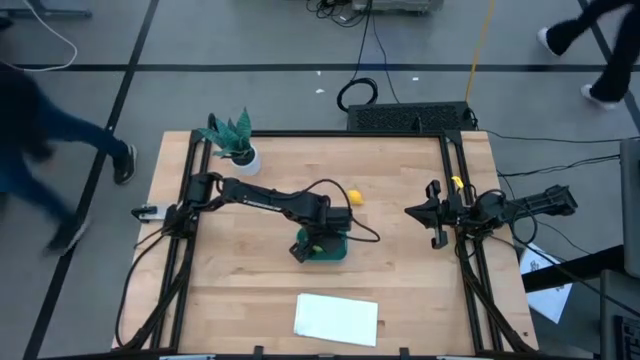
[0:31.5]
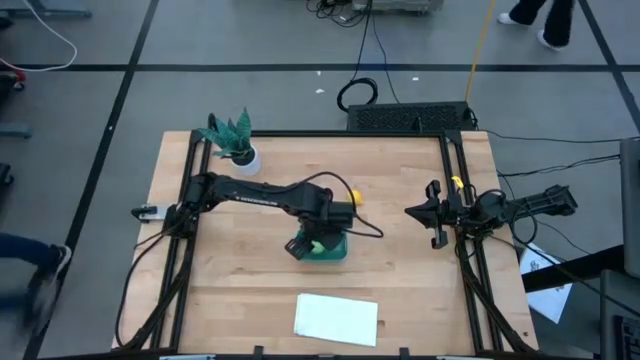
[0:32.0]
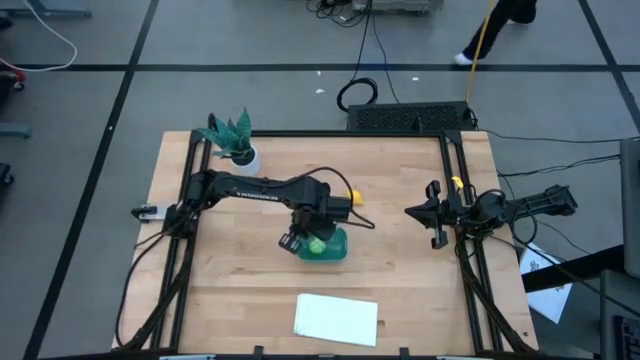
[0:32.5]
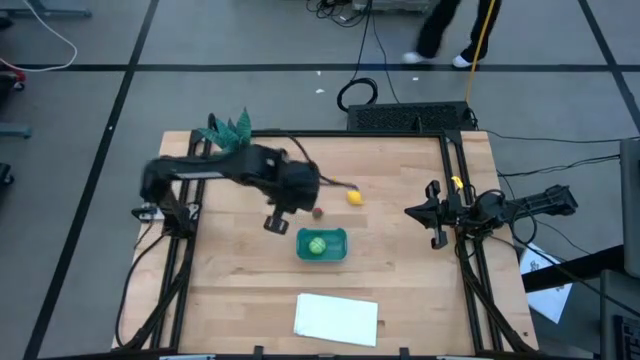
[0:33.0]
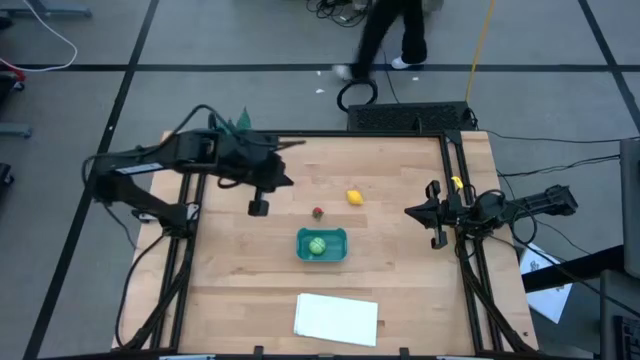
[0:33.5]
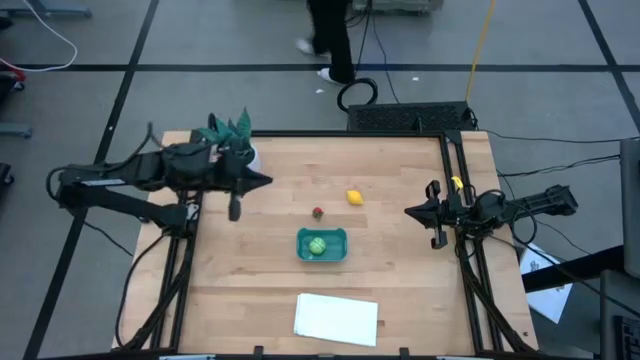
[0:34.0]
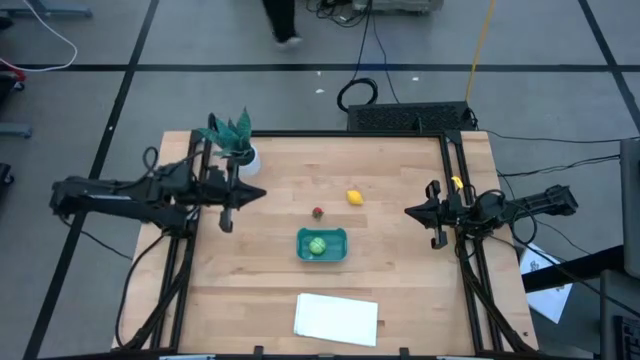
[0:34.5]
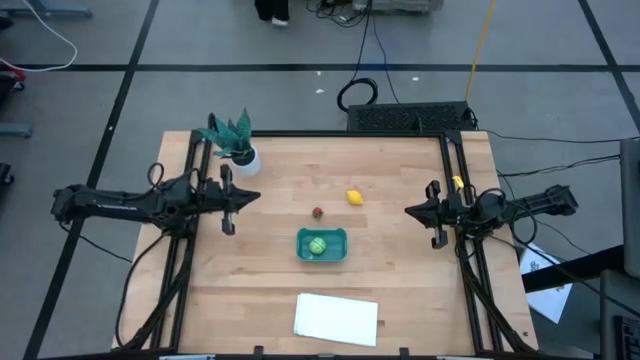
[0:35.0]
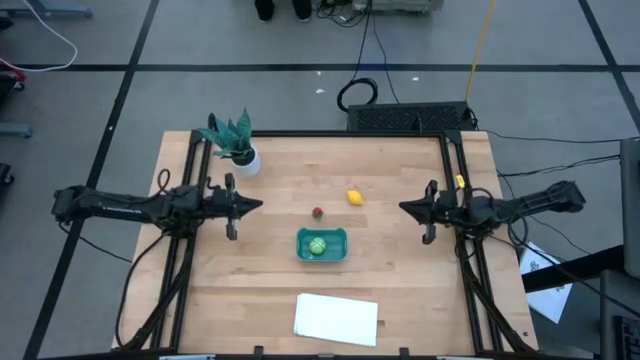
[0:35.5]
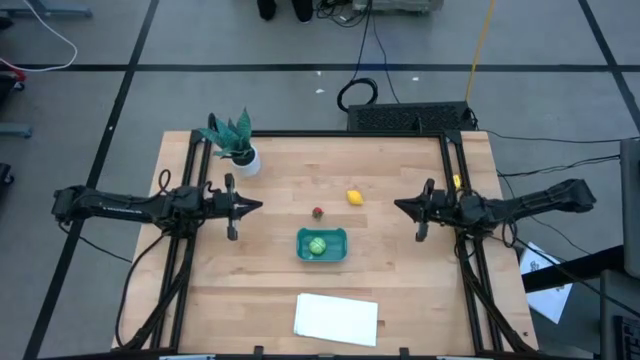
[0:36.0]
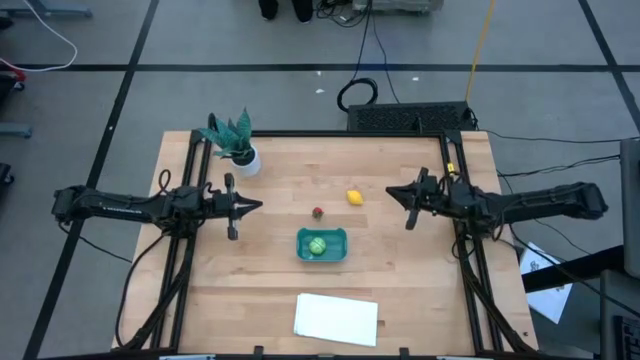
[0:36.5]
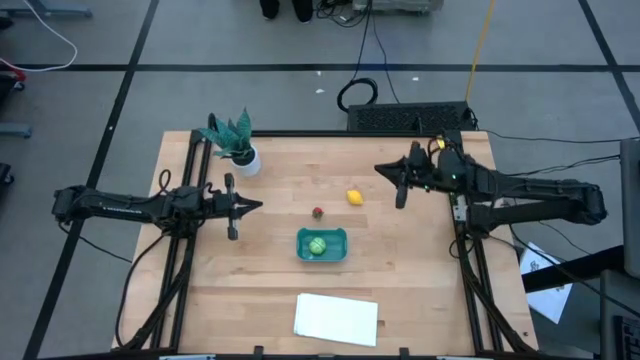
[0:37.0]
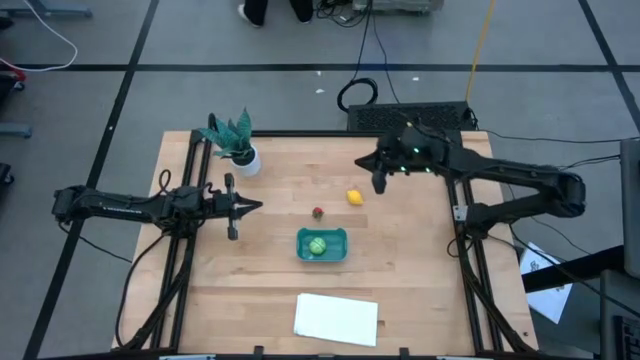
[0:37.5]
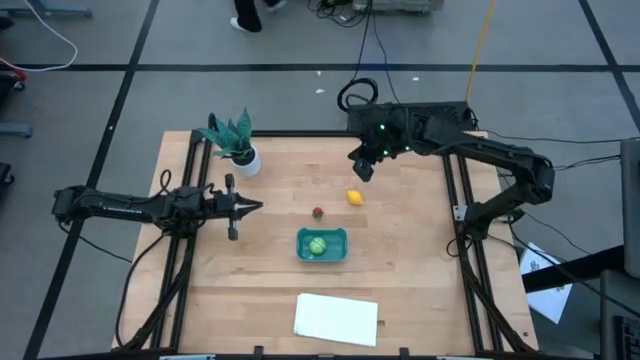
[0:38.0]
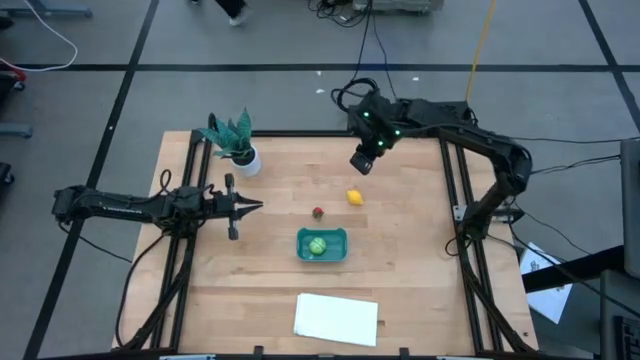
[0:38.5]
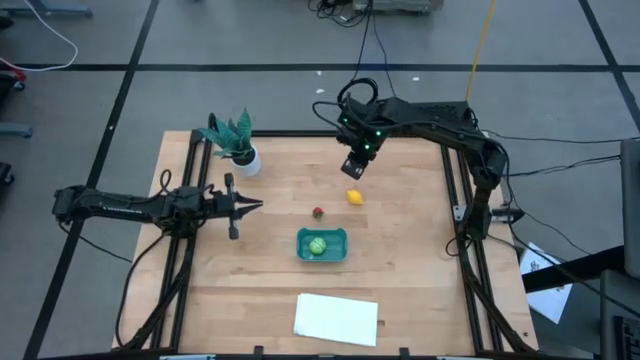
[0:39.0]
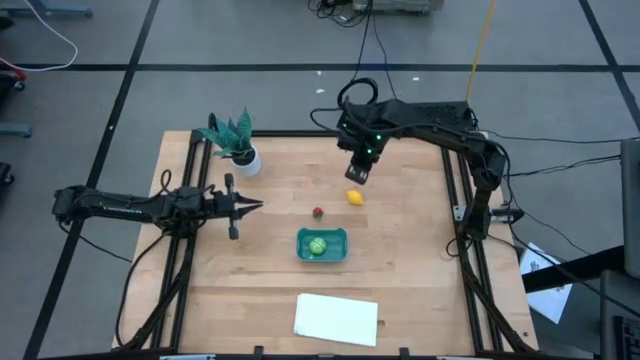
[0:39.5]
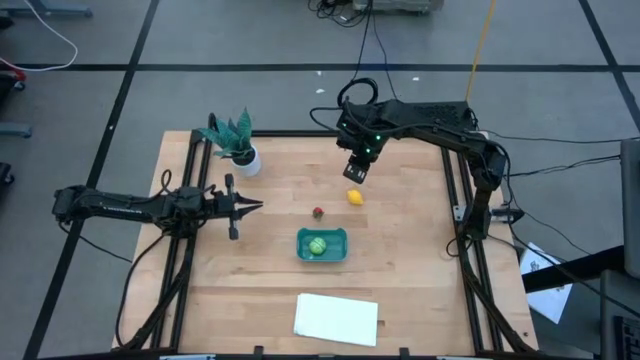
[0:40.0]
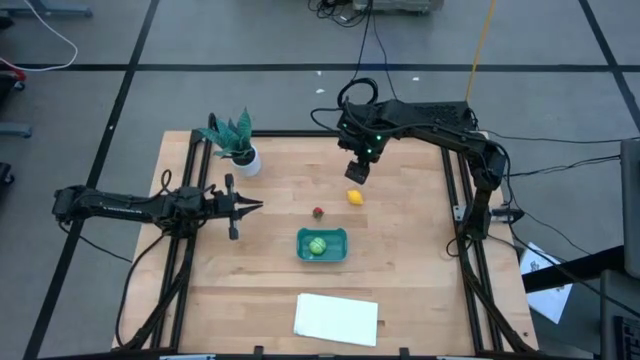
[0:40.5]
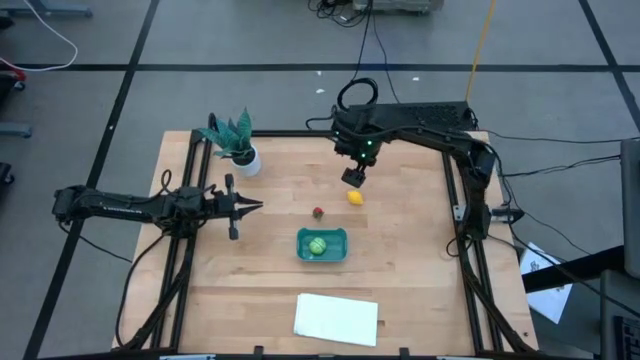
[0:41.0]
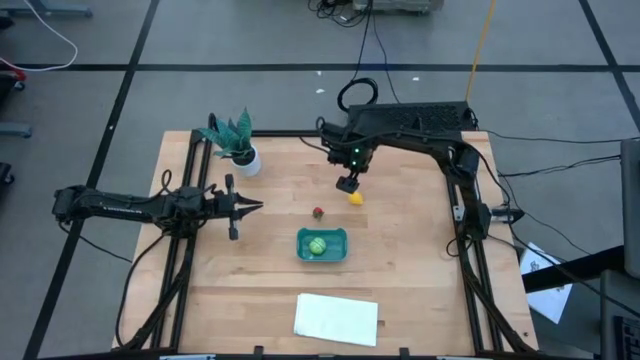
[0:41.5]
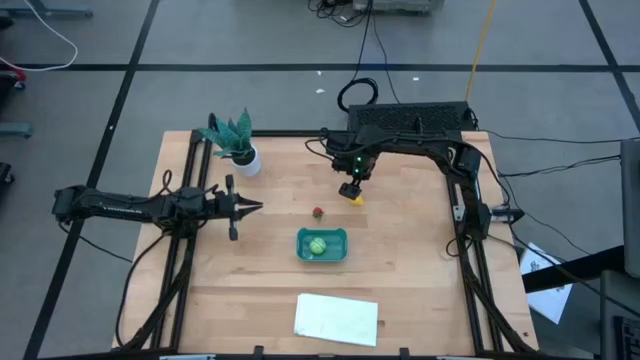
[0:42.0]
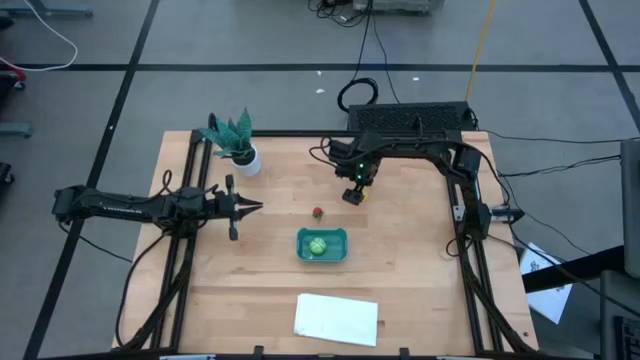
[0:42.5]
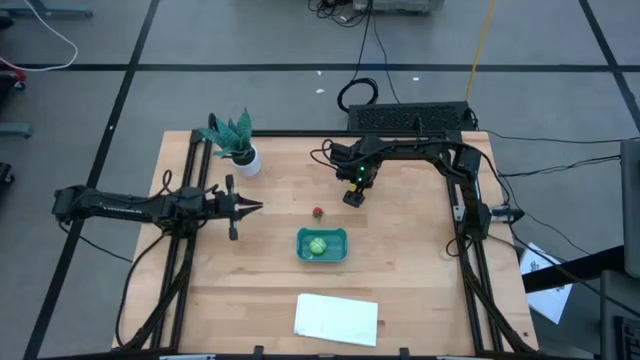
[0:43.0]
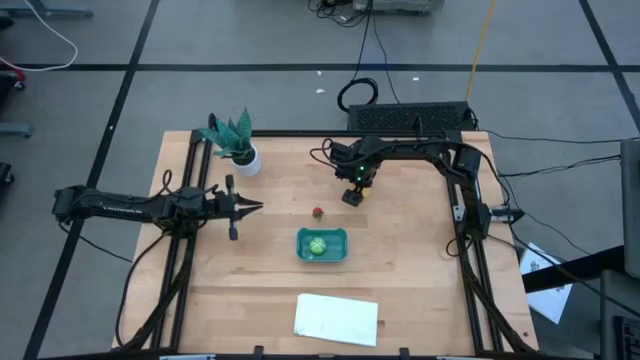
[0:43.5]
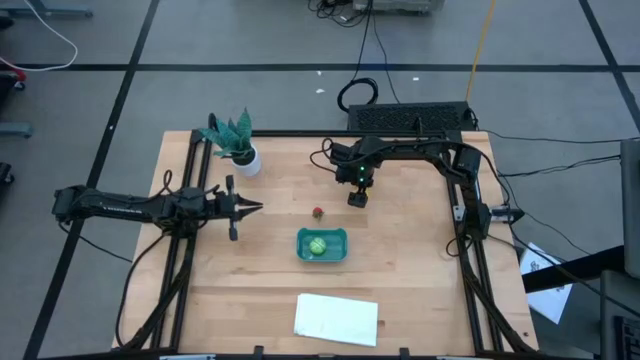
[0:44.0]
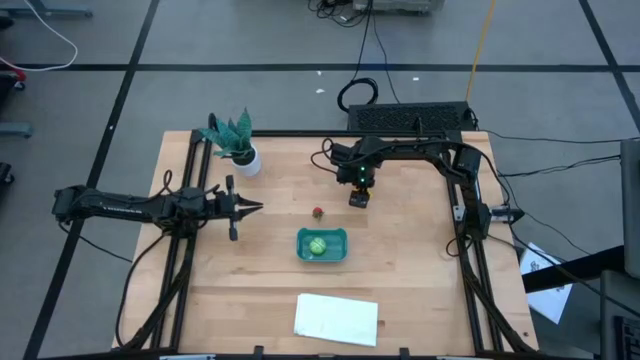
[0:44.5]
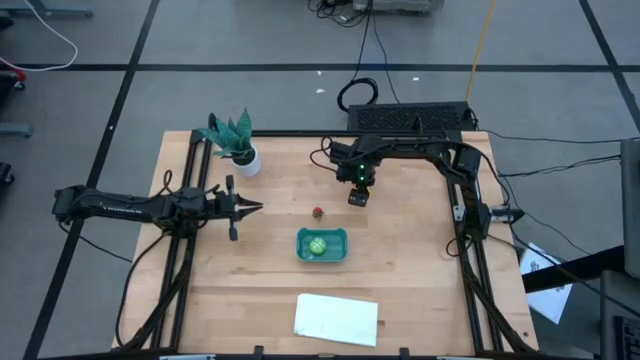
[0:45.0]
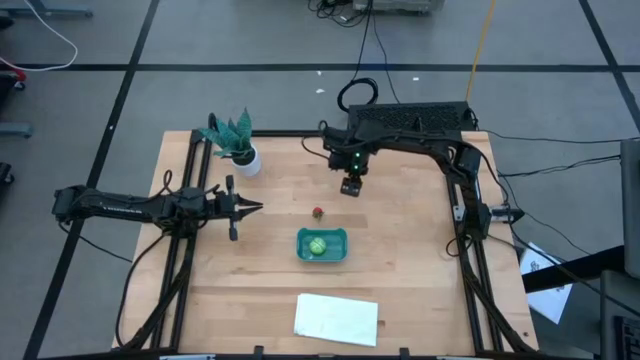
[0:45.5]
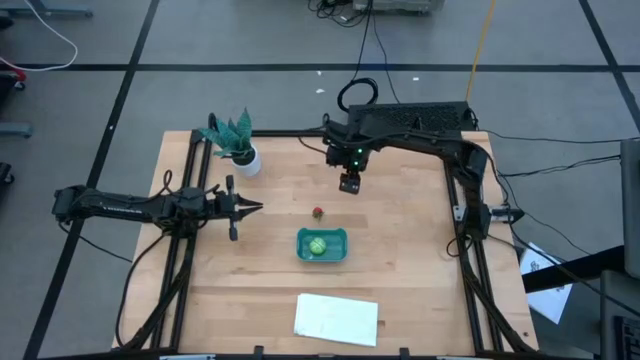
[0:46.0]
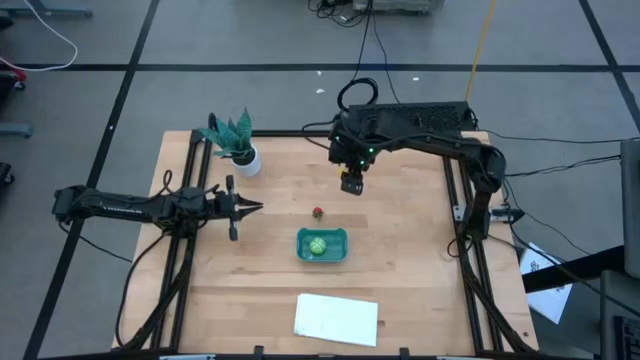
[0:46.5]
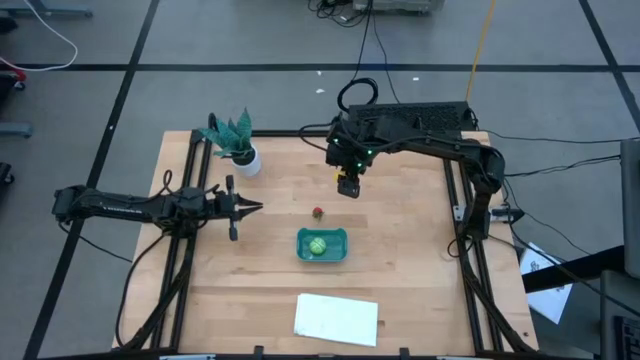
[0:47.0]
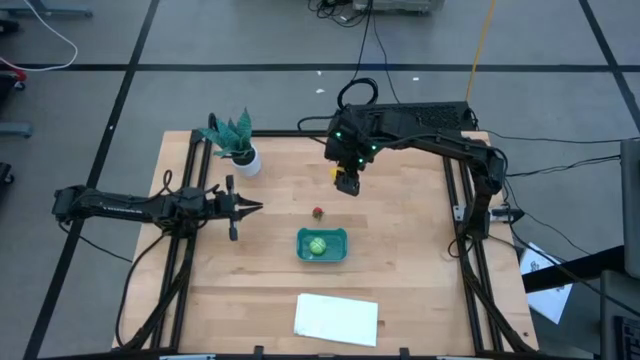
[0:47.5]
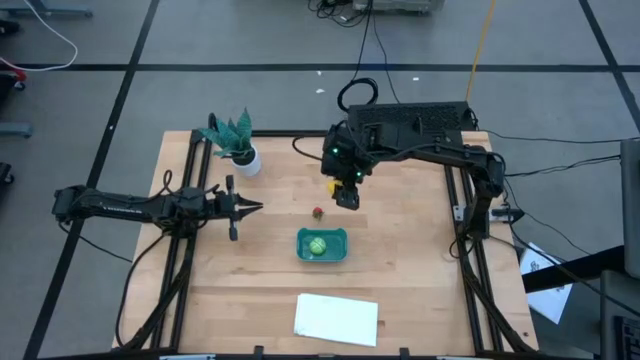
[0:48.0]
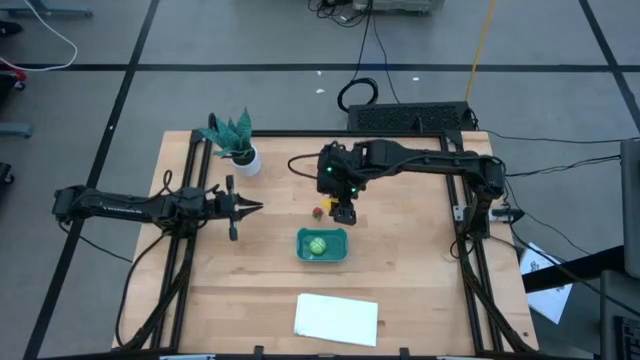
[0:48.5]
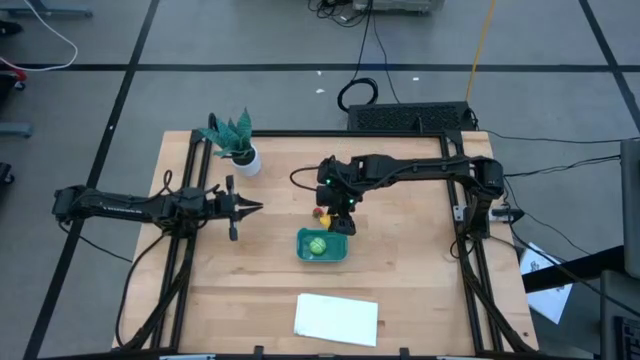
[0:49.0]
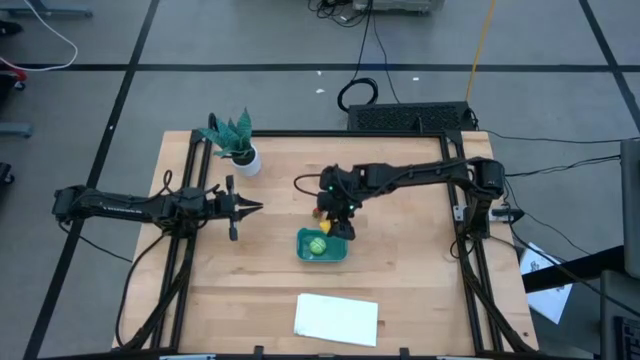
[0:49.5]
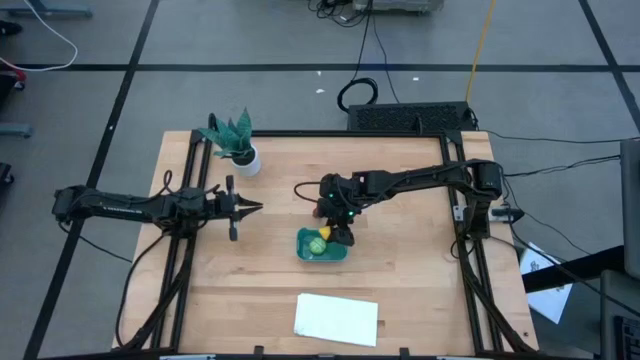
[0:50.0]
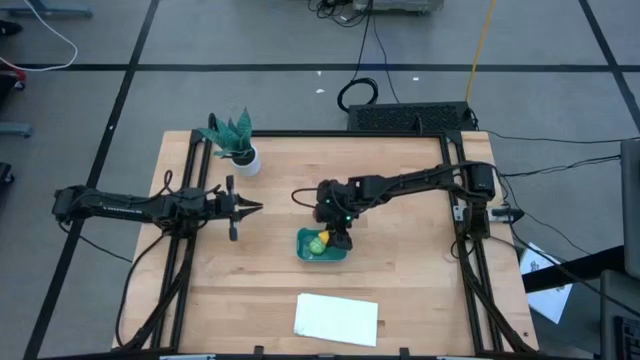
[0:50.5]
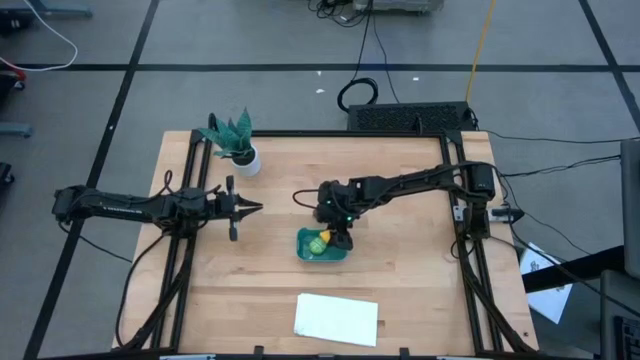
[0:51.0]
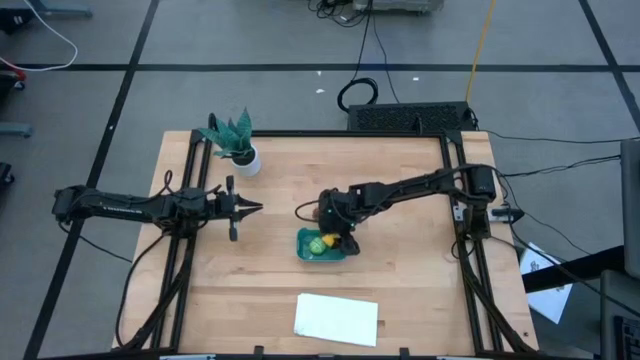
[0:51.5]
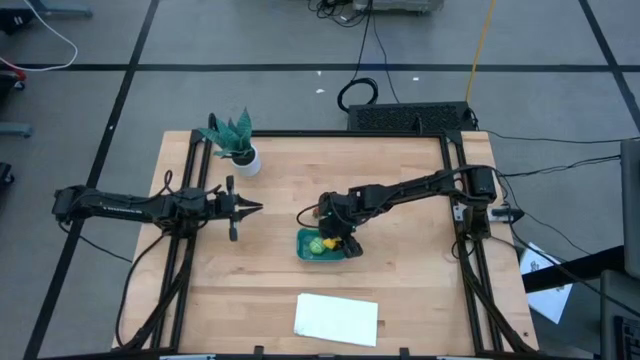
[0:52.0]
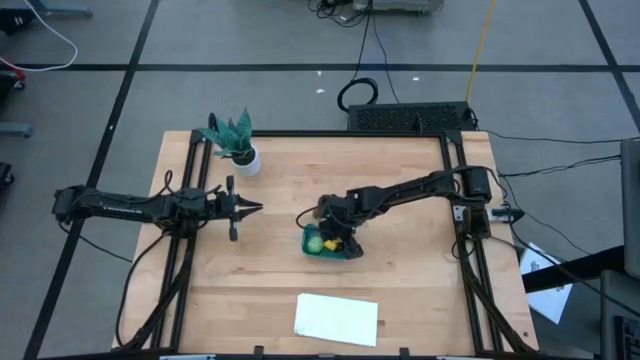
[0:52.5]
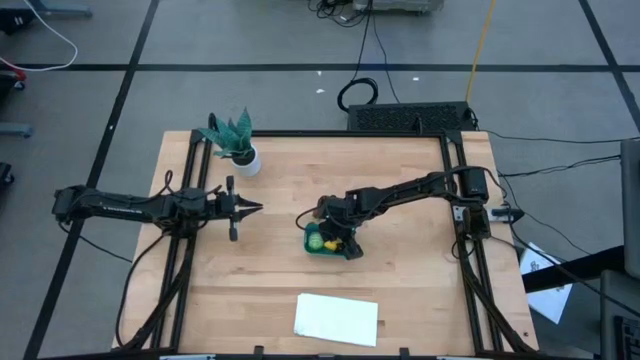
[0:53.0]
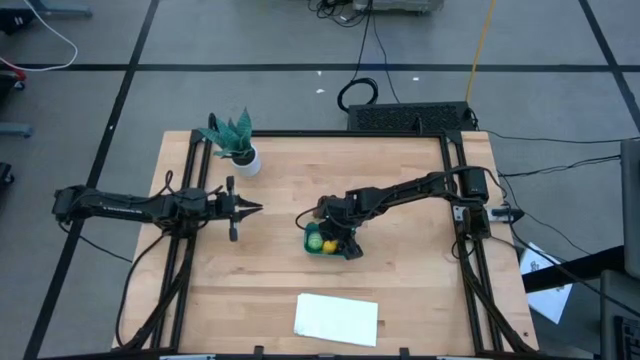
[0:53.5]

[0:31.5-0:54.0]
Task: Pick and placing Produce into tupperware
Put the lemon into the blue bin
